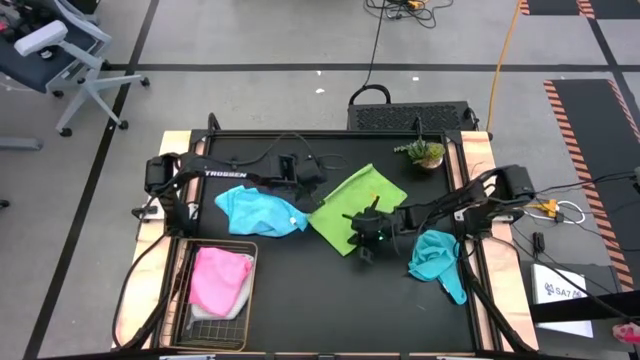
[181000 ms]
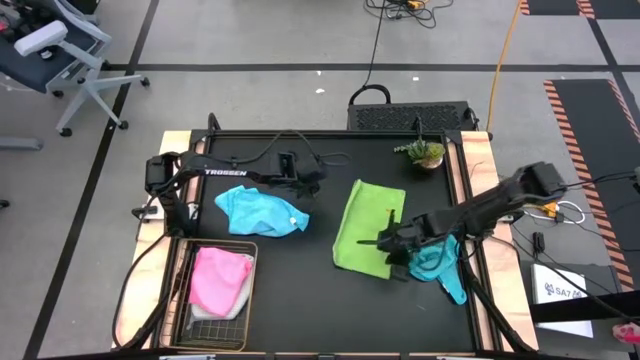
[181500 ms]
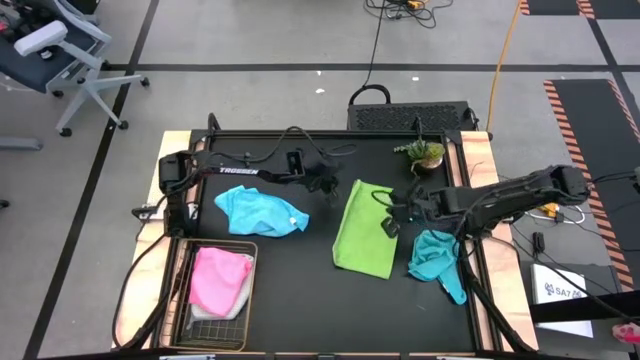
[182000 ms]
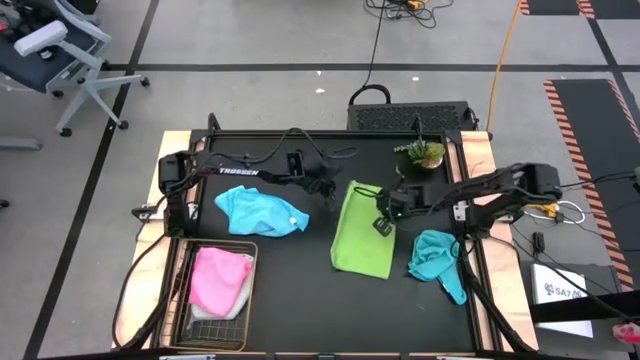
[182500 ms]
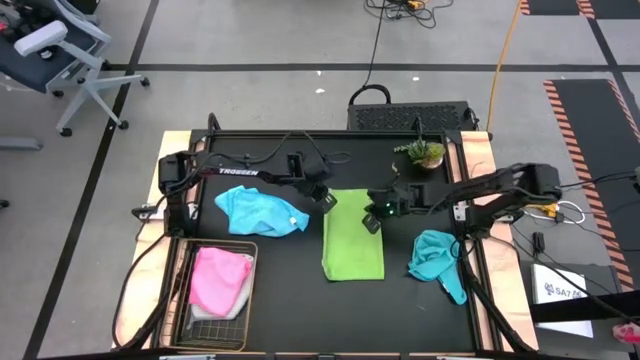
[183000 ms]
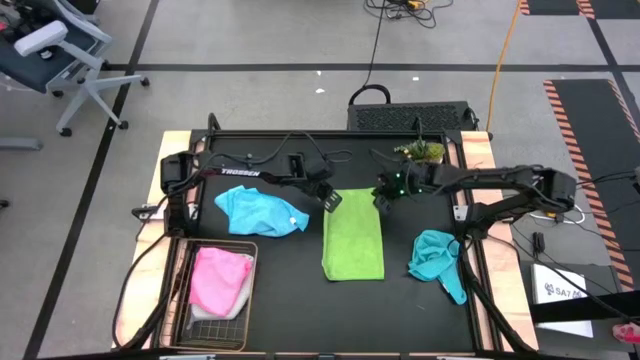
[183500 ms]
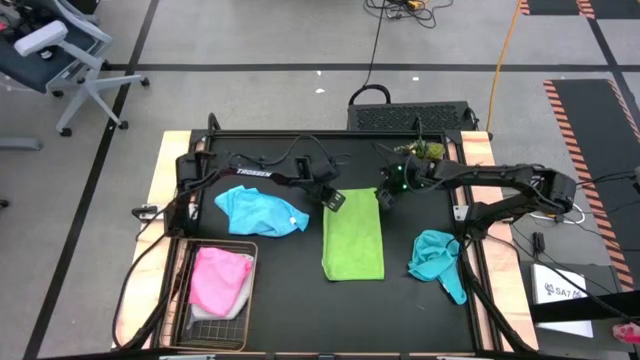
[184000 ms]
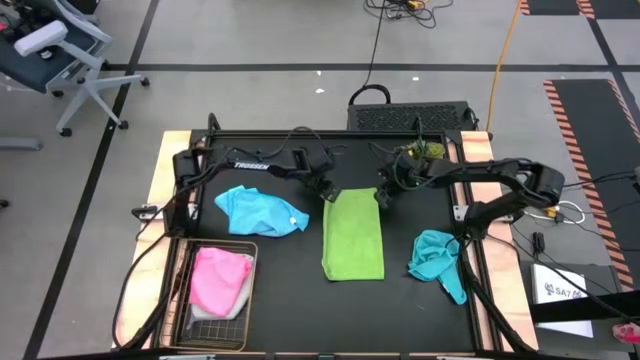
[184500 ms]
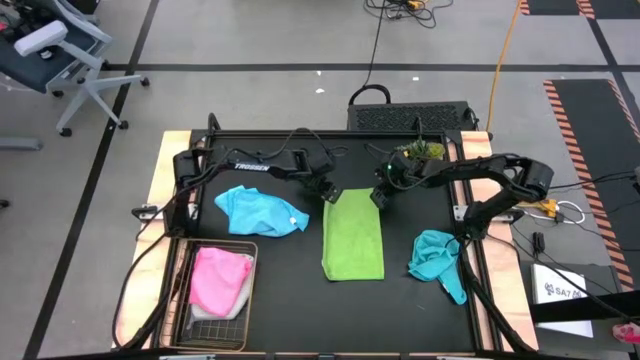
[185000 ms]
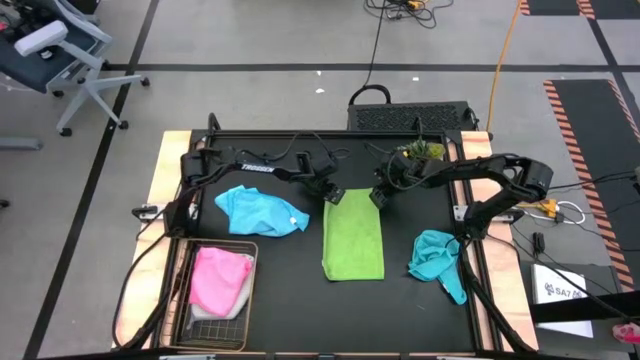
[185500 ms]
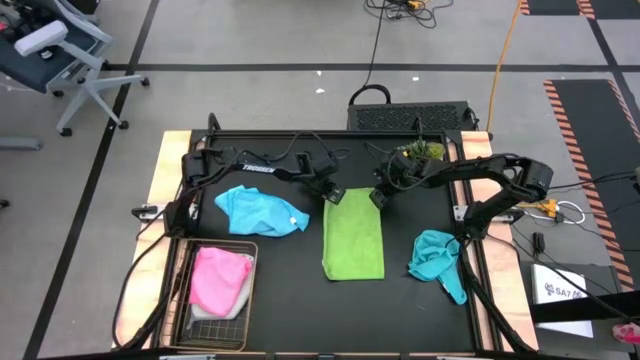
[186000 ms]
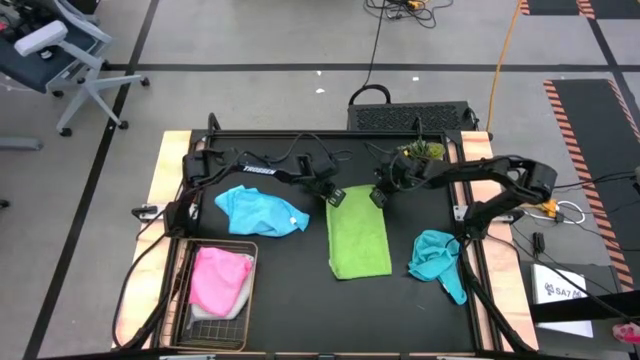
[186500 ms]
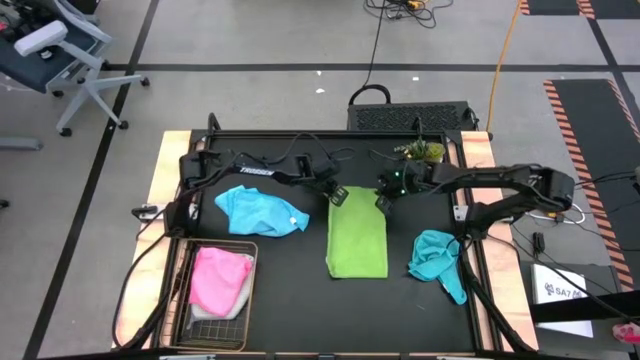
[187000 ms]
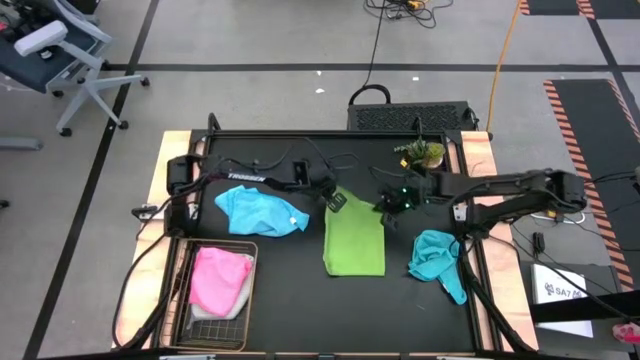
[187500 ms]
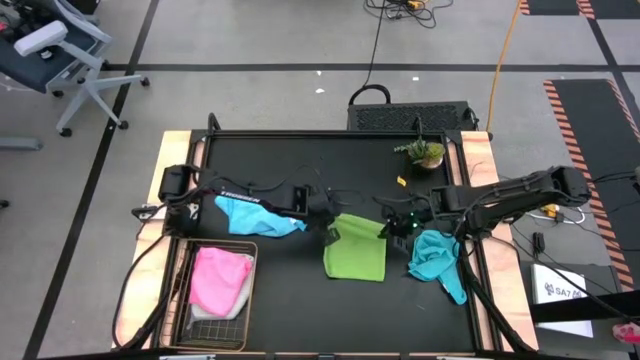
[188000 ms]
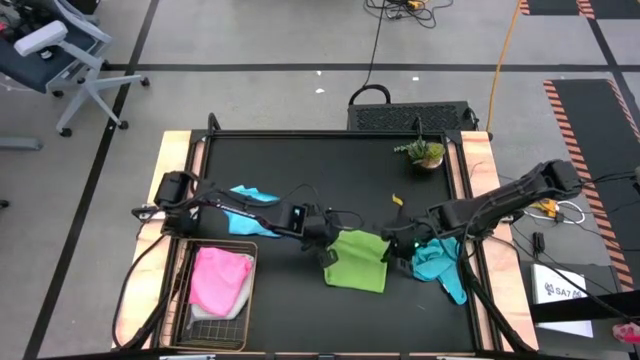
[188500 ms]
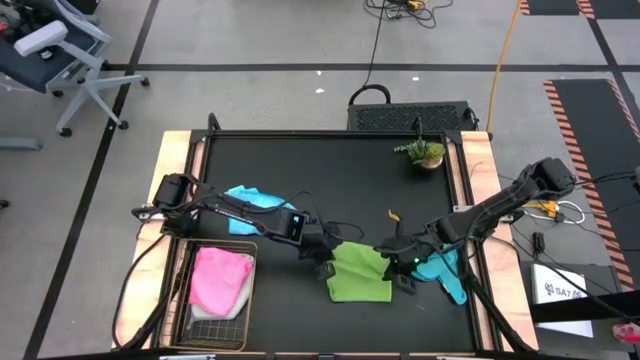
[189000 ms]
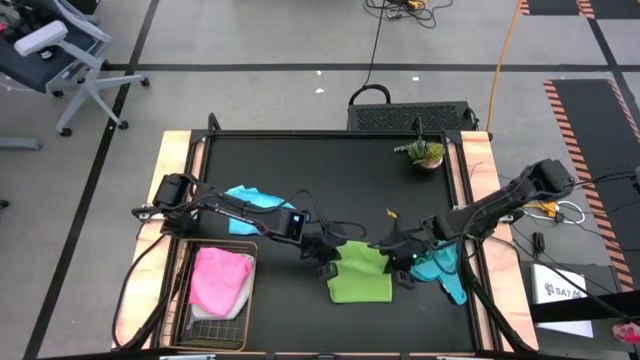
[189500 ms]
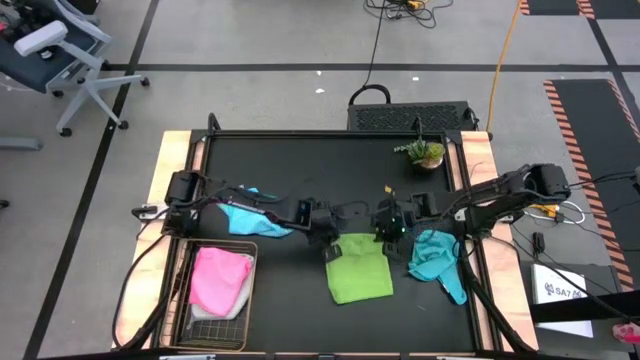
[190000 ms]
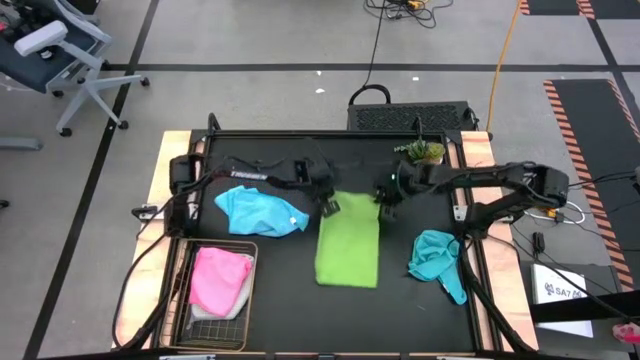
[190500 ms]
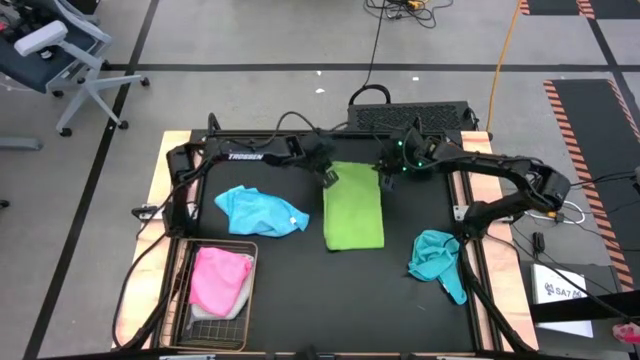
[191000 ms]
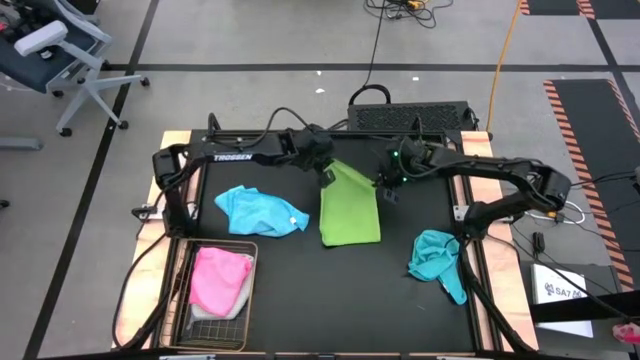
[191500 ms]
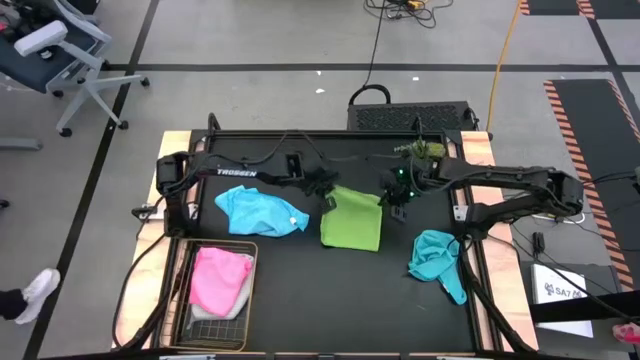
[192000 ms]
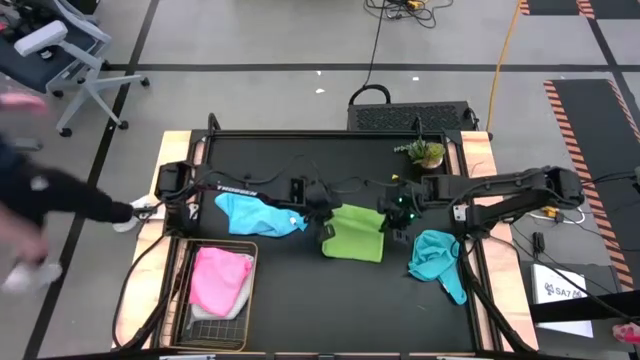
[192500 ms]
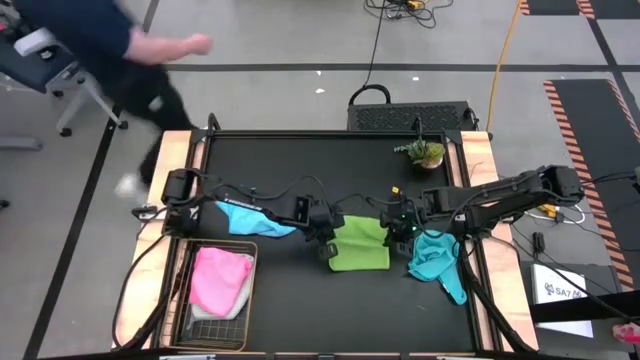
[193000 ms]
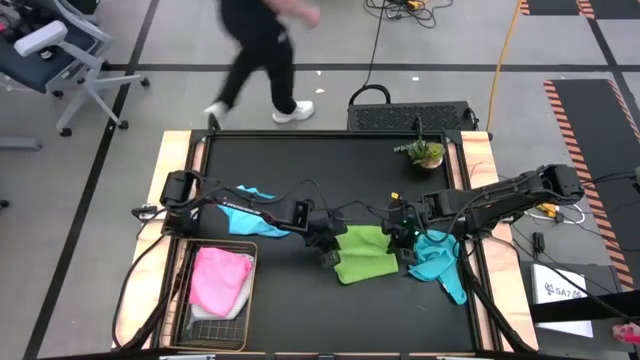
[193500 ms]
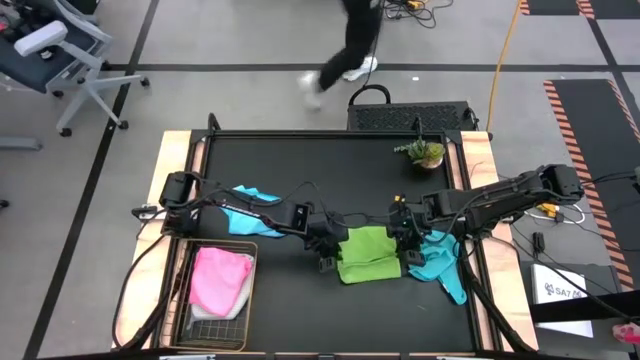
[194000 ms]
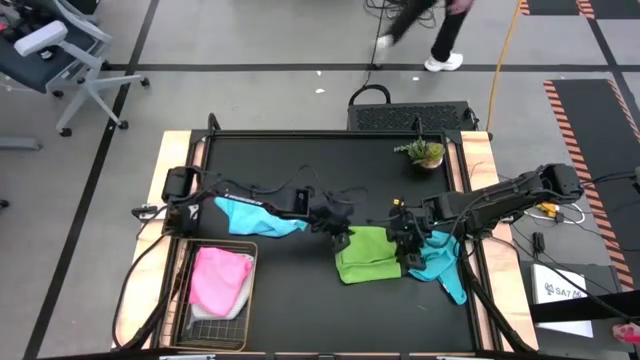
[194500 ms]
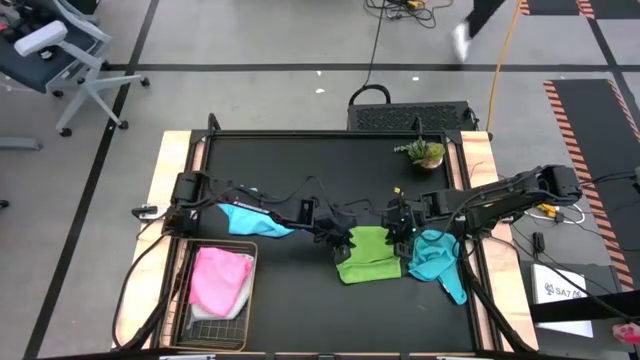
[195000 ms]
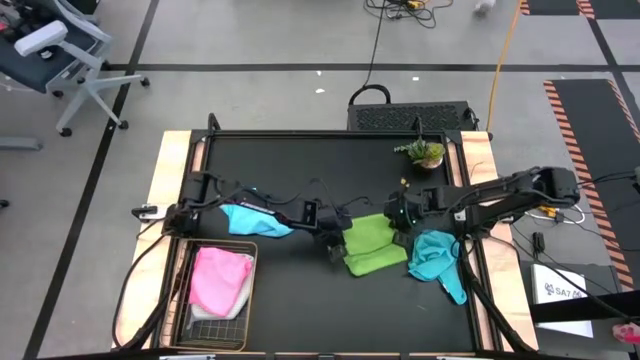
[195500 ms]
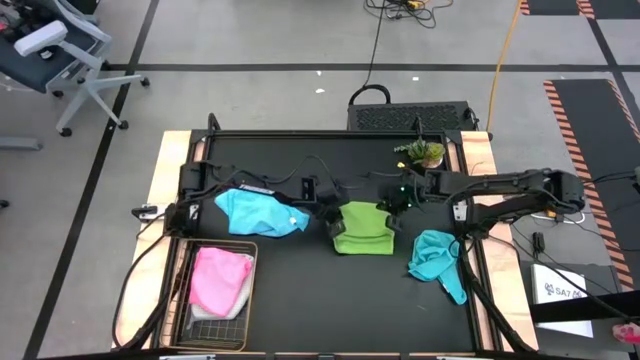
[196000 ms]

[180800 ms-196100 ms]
Task: Fold microfiber towels
Fold the green microfiber cloth

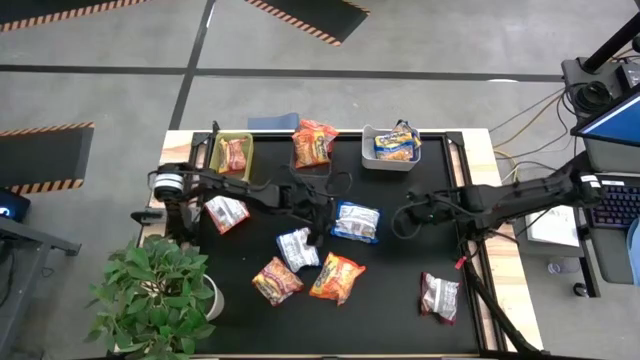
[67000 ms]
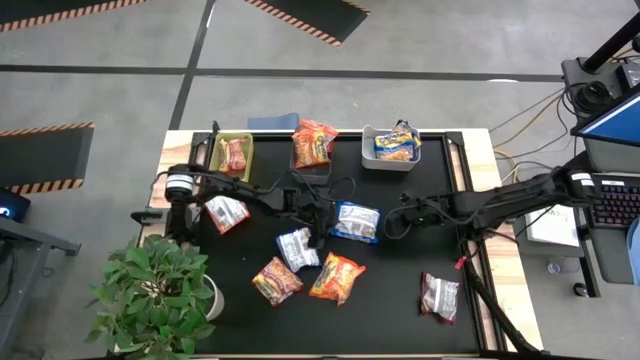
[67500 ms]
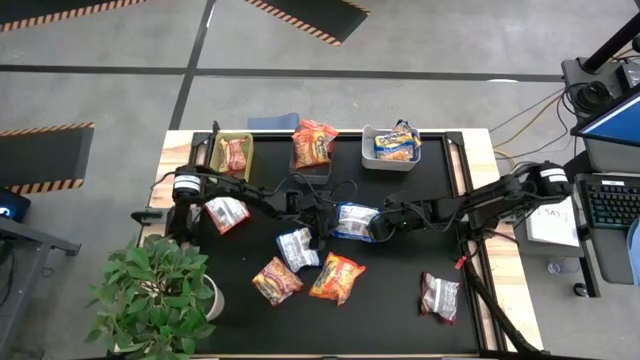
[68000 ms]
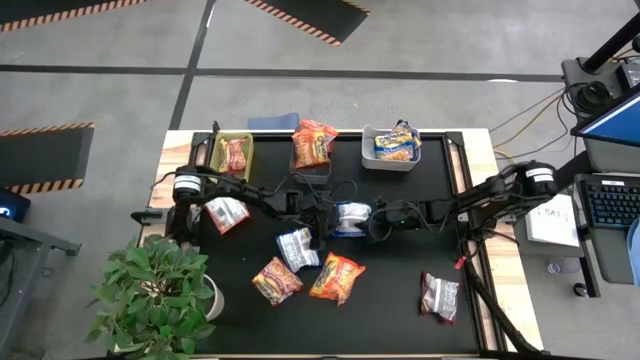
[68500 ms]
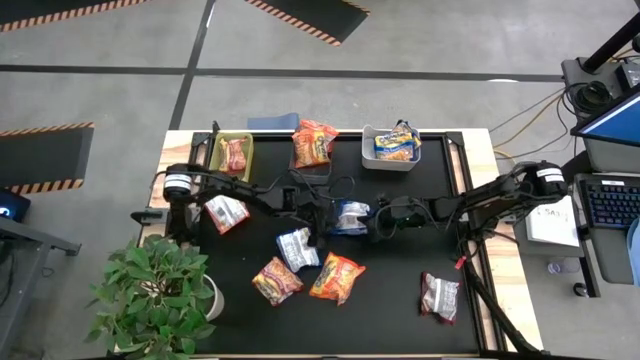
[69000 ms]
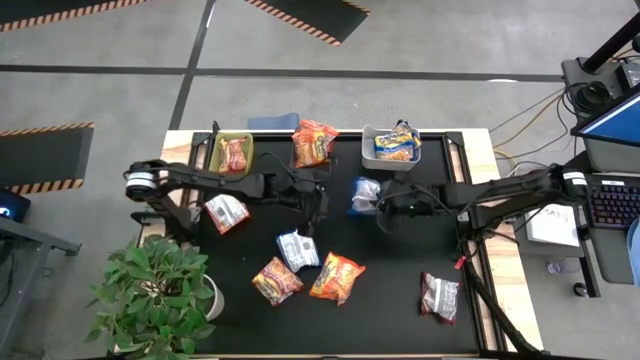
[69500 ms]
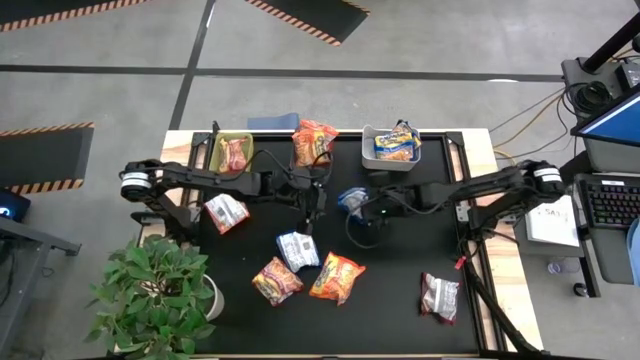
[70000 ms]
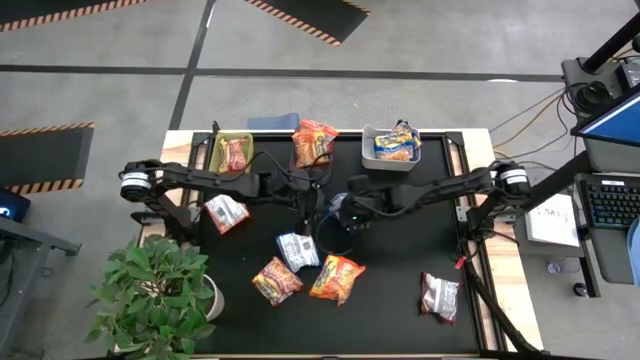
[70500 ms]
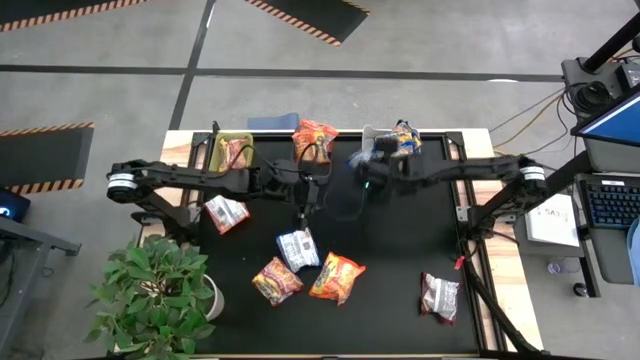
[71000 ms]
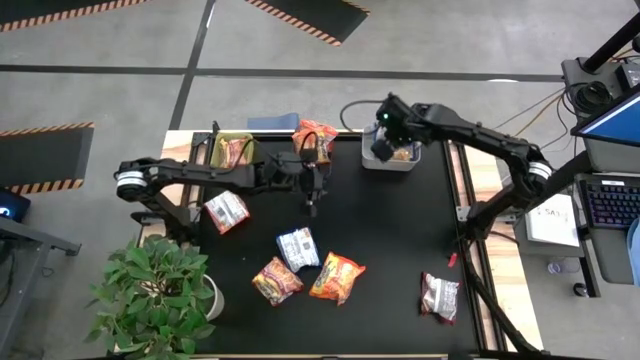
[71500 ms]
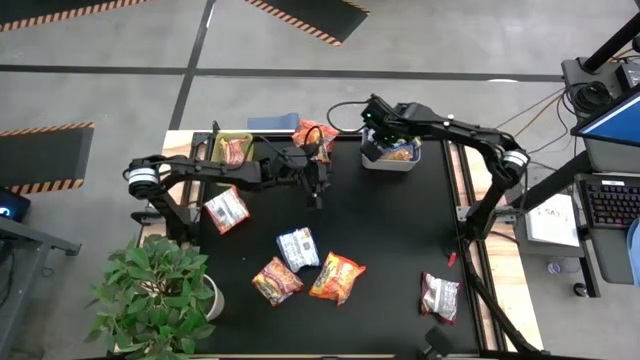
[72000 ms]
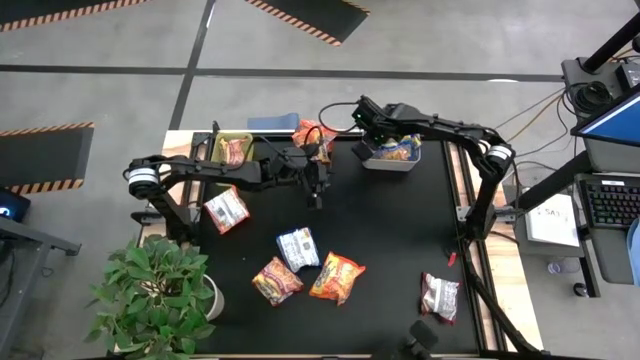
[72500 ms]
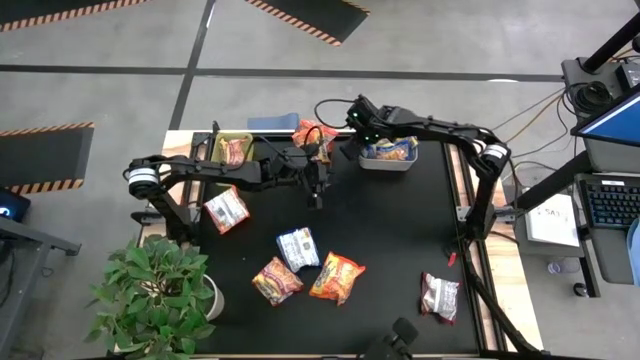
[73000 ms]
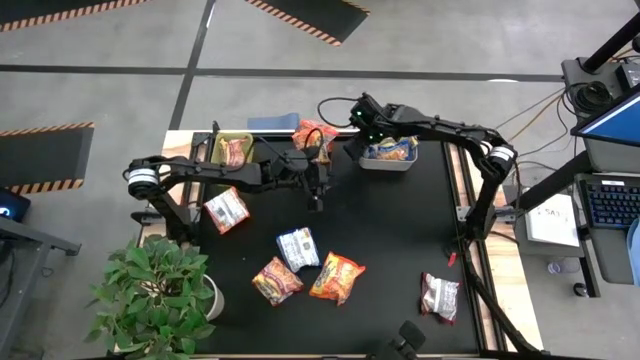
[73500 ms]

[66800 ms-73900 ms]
Task: Sort Maruchan noodles
Put the blue noodle pack into the white bin
